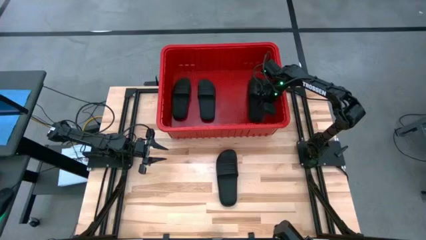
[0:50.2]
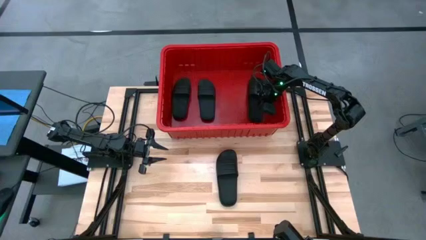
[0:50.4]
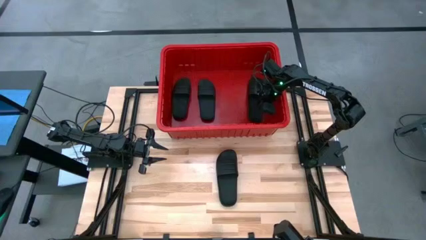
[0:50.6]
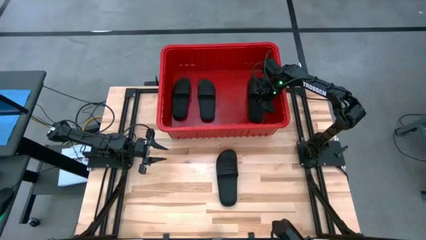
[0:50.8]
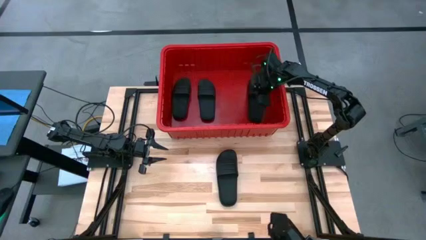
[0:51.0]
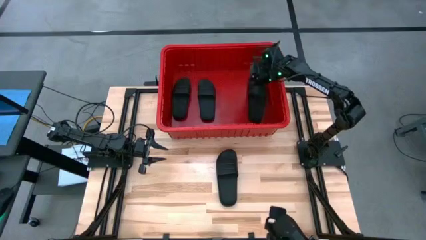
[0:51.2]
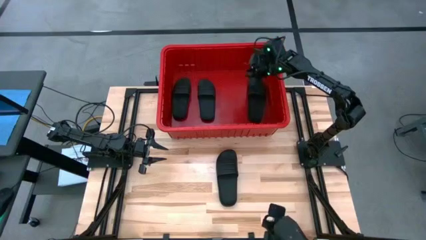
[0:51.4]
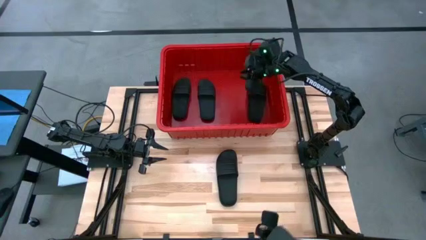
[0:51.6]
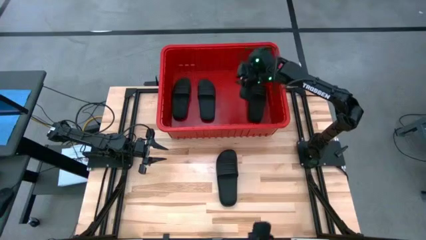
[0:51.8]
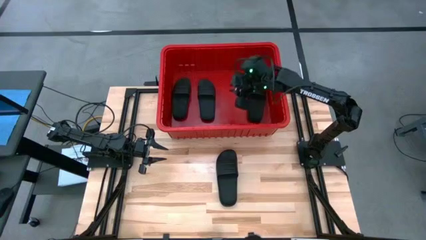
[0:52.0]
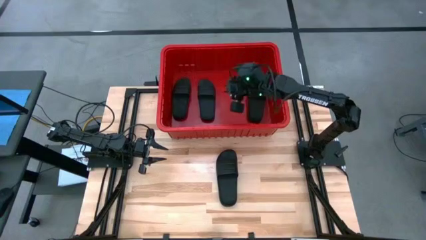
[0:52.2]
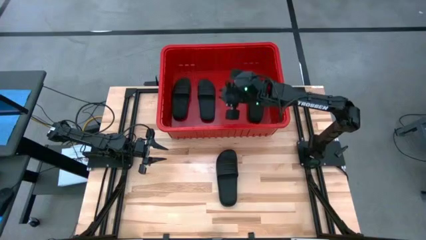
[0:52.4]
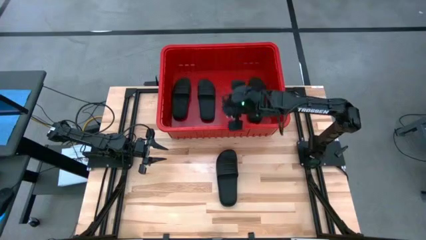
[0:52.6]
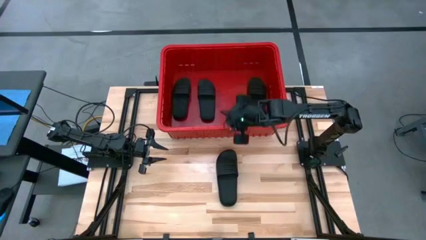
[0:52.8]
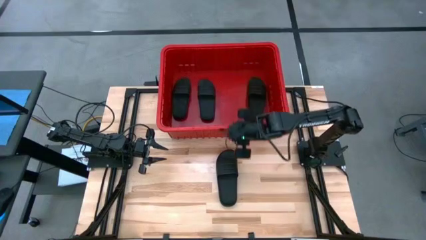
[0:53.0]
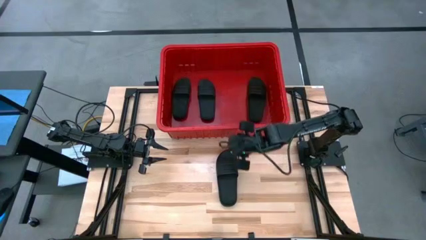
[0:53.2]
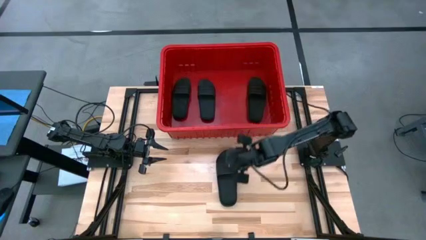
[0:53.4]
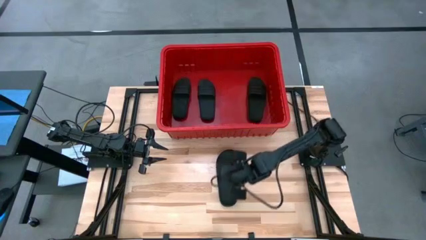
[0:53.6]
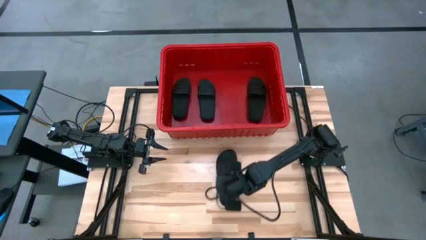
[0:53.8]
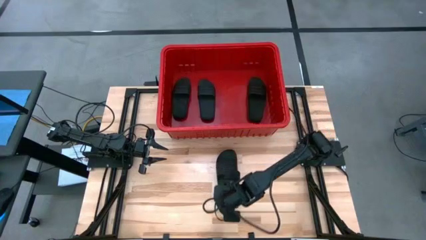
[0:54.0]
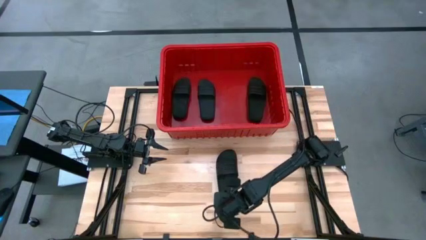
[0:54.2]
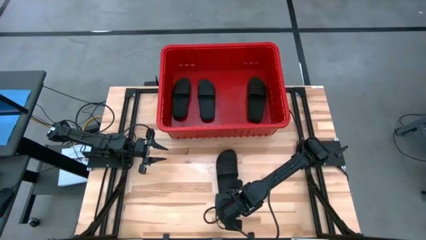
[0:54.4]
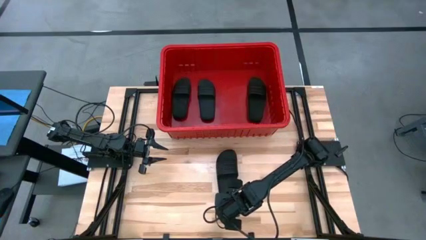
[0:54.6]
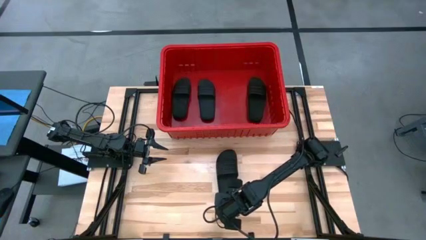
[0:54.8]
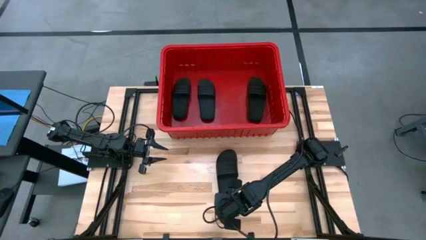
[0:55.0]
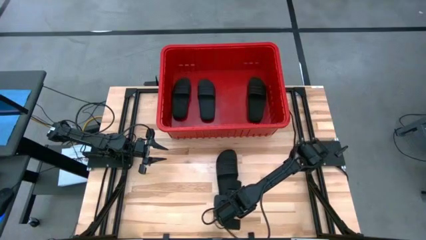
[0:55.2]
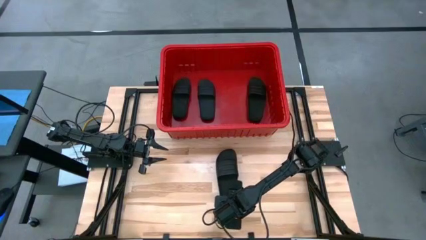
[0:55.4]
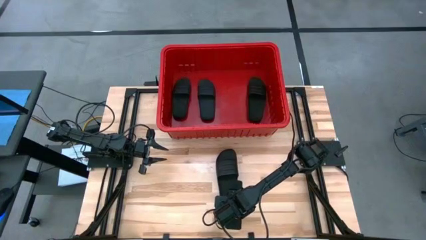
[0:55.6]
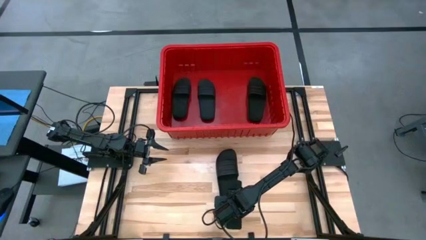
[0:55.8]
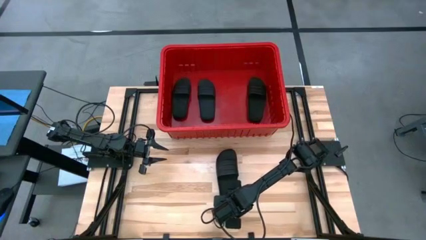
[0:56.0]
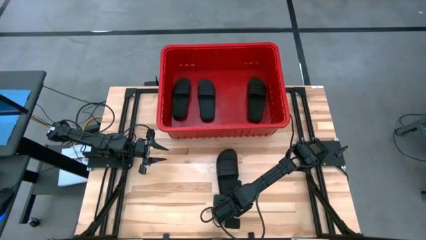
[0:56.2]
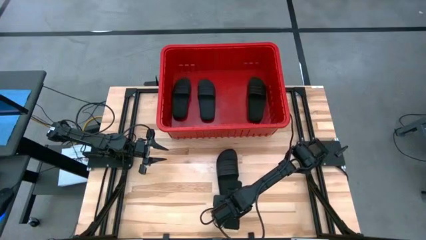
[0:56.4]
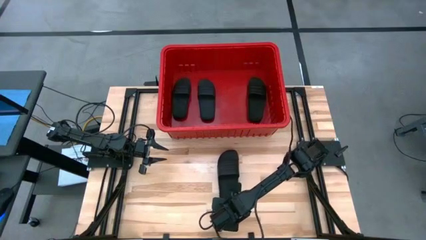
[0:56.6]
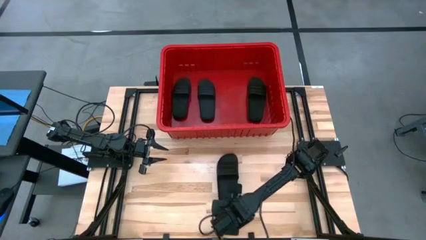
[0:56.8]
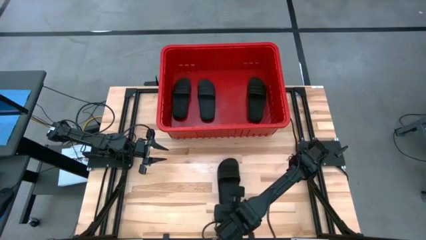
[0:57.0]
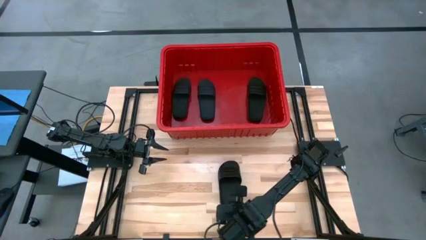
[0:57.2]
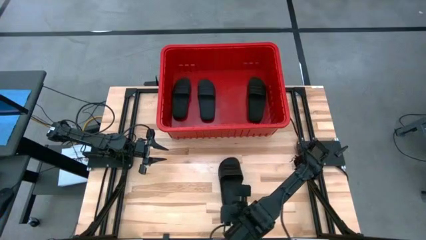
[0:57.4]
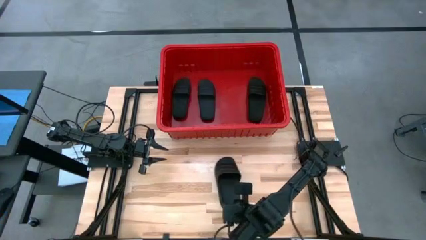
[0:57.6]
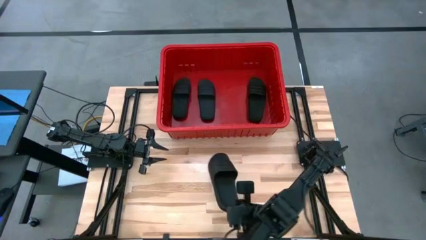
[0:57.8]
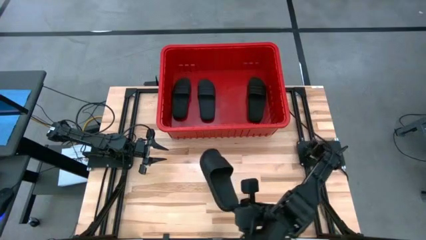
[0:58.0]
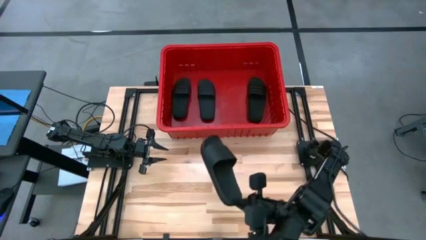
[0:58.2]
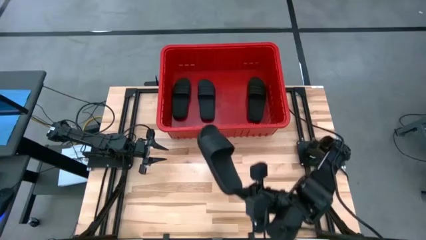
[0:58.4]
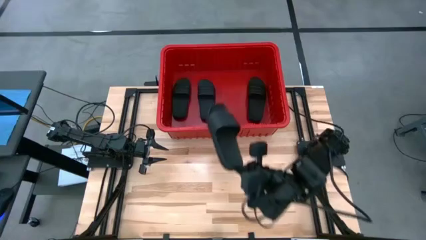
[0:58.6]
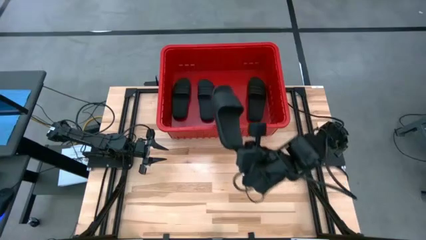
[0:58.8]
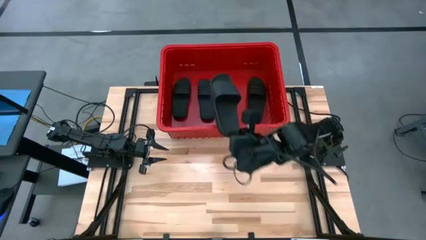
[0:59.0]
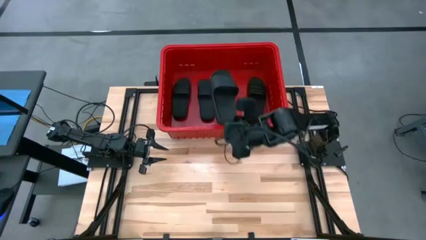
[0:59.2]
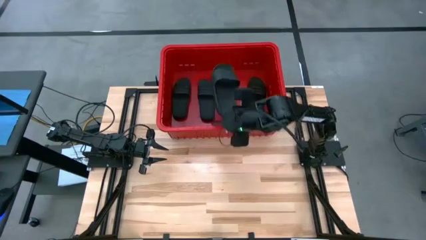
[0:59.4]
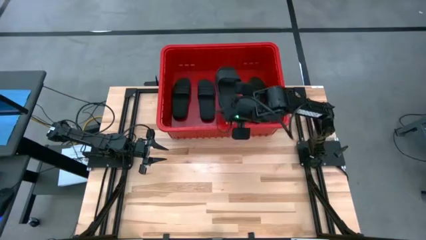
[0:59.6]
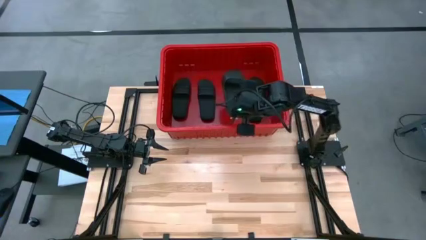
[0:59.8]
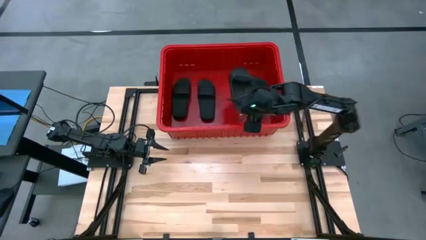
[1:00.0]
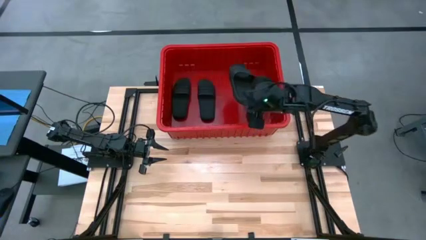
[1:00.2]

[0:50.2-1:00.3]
Task: Pick and place slides into bin
Put the slide into the bin
